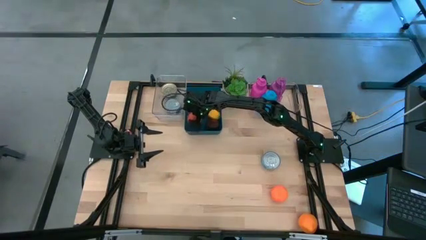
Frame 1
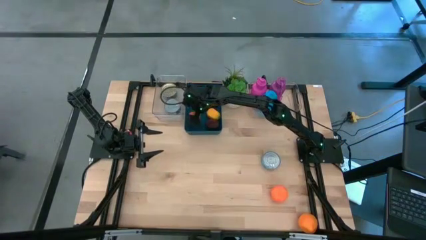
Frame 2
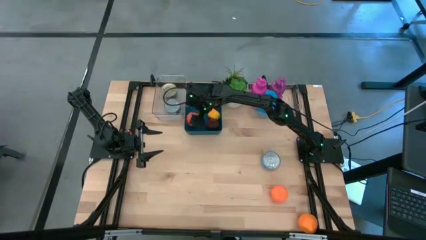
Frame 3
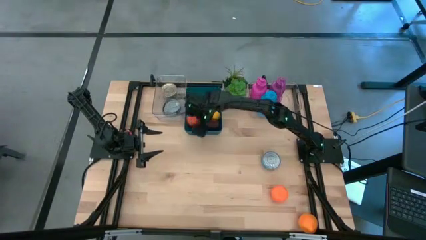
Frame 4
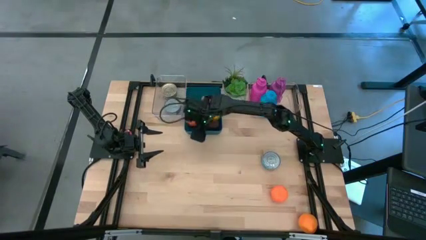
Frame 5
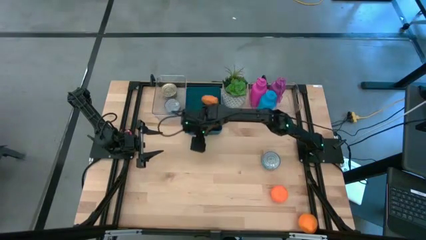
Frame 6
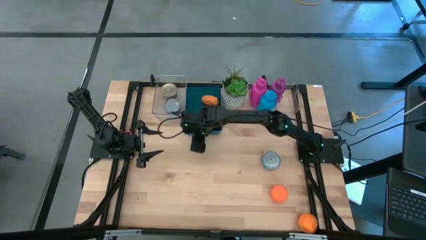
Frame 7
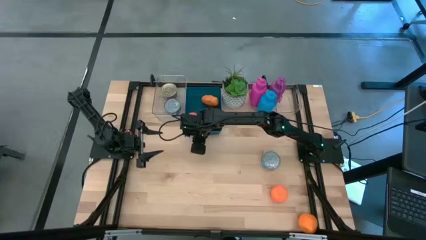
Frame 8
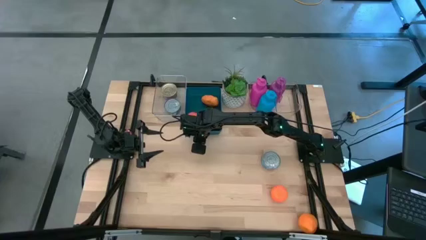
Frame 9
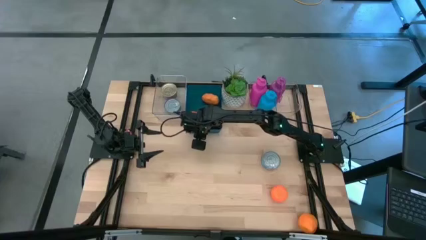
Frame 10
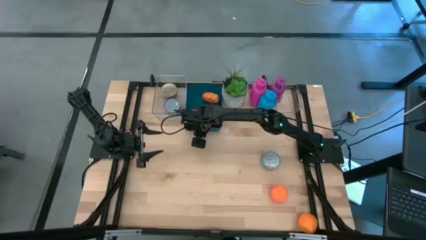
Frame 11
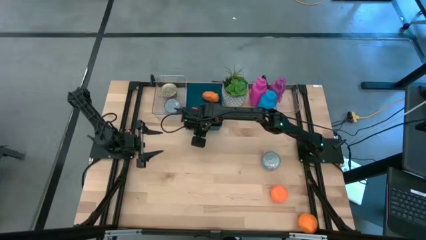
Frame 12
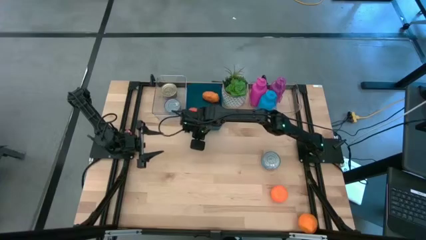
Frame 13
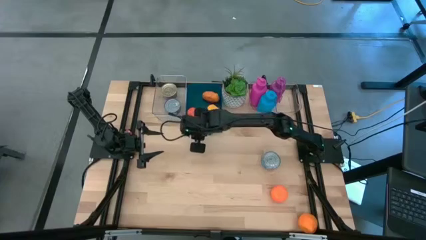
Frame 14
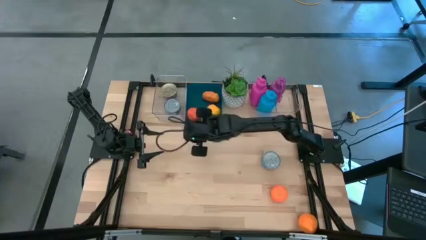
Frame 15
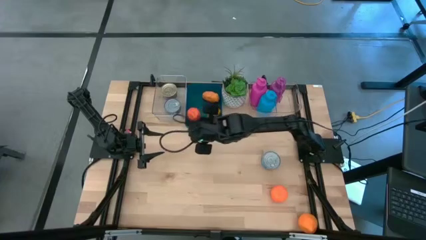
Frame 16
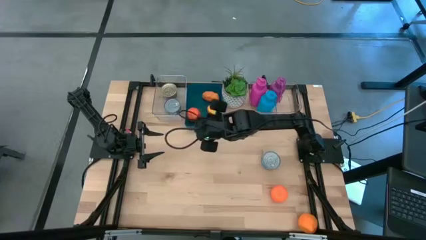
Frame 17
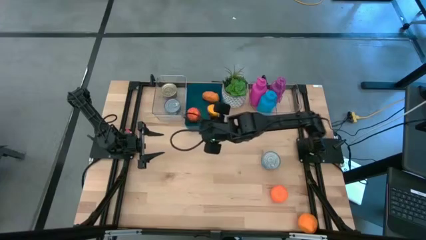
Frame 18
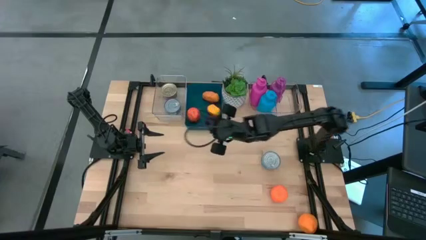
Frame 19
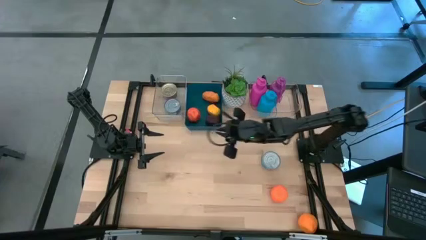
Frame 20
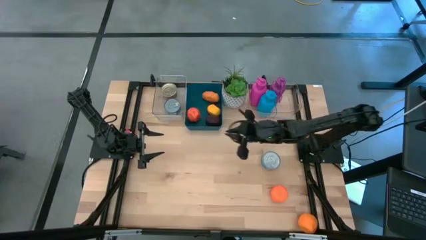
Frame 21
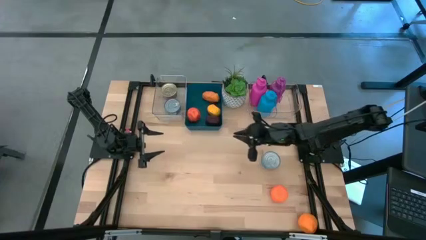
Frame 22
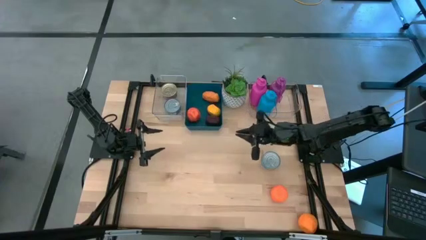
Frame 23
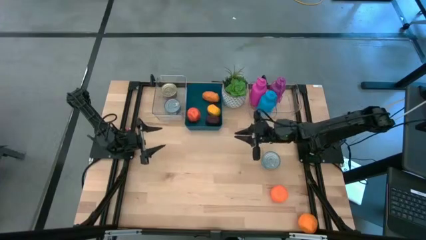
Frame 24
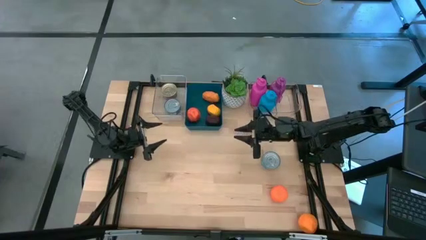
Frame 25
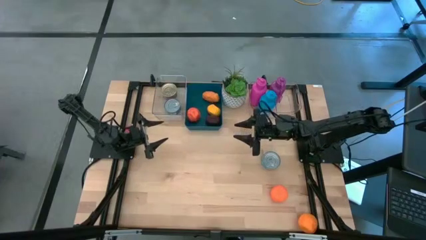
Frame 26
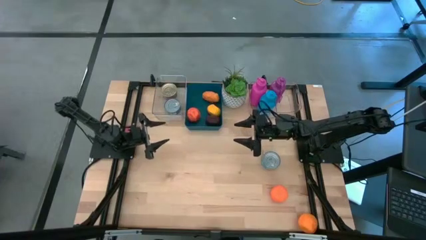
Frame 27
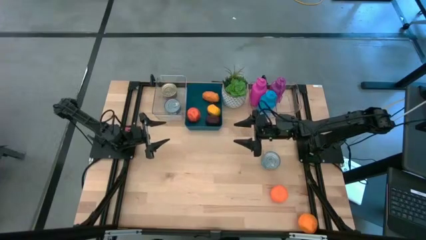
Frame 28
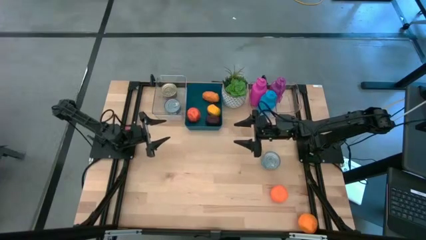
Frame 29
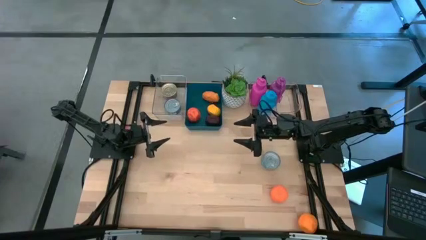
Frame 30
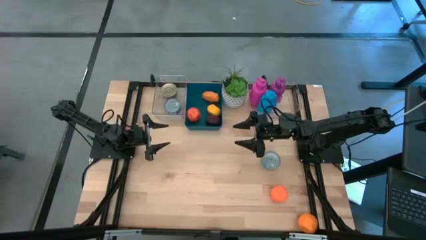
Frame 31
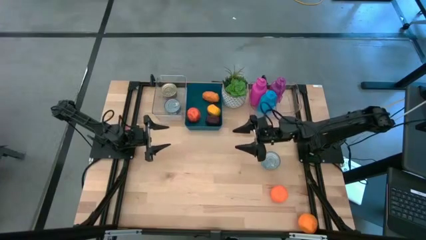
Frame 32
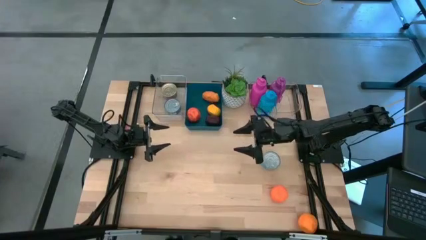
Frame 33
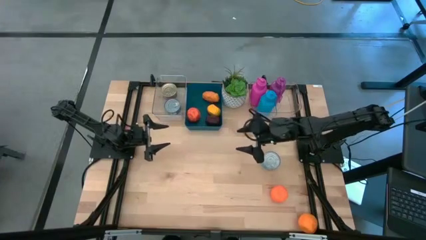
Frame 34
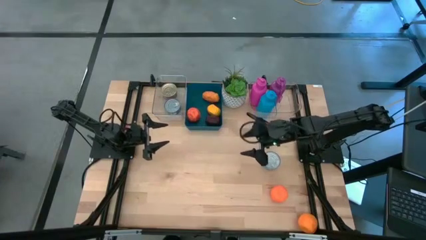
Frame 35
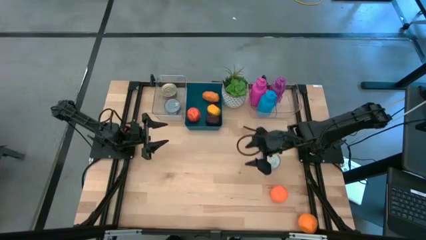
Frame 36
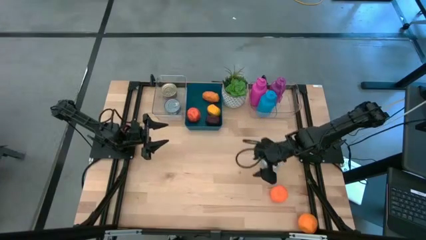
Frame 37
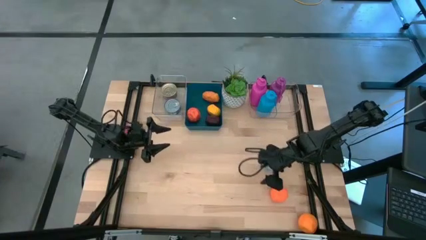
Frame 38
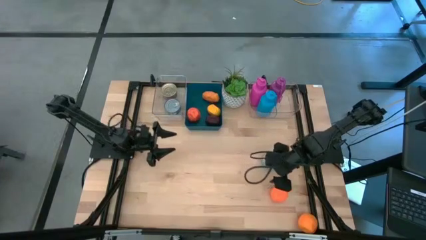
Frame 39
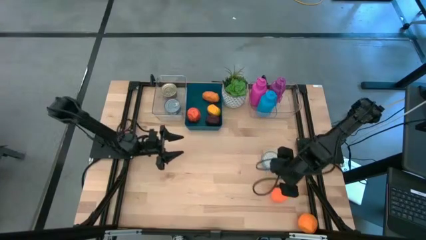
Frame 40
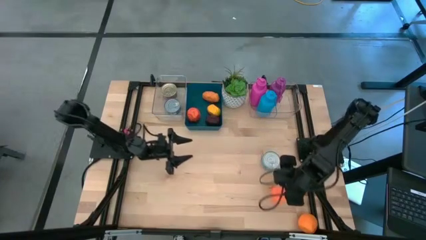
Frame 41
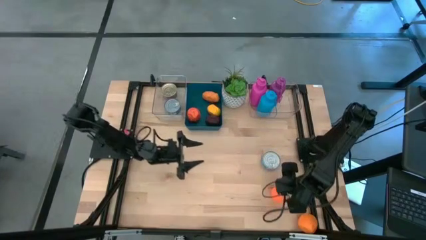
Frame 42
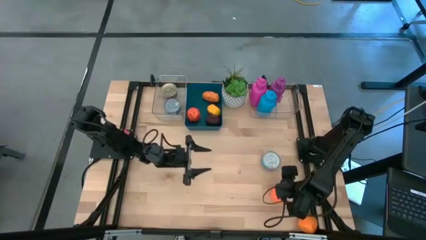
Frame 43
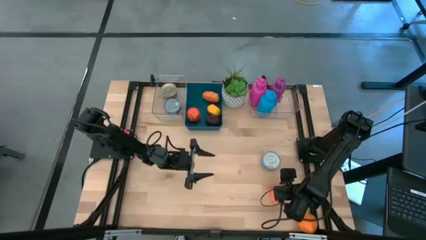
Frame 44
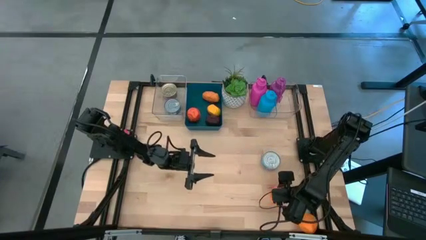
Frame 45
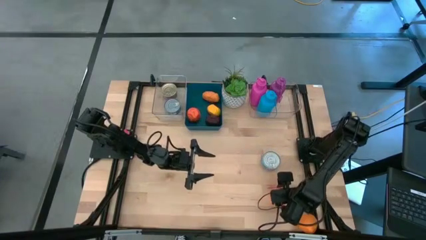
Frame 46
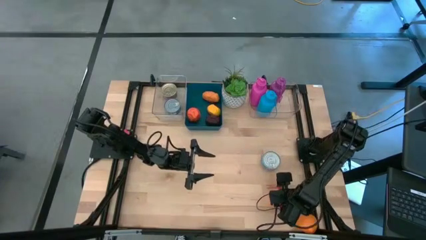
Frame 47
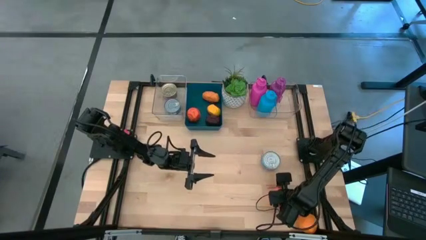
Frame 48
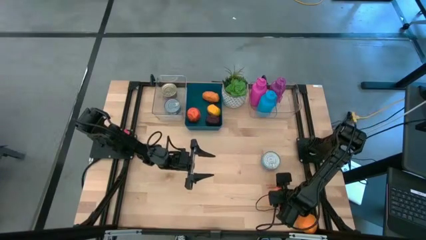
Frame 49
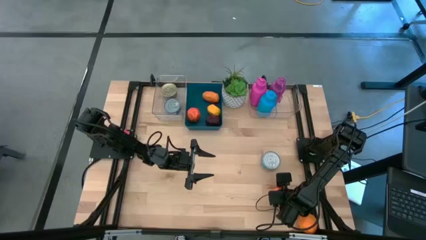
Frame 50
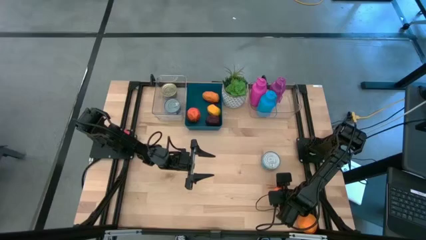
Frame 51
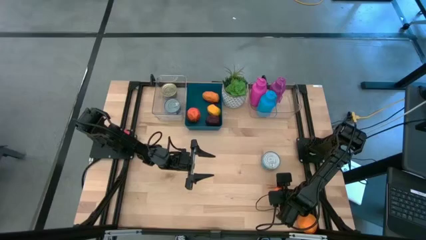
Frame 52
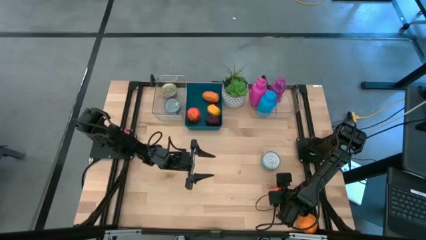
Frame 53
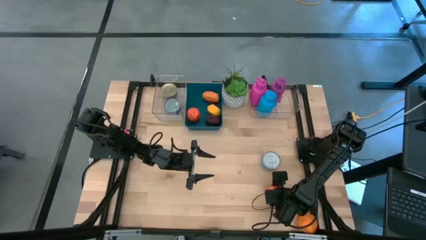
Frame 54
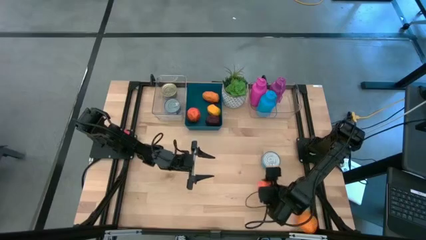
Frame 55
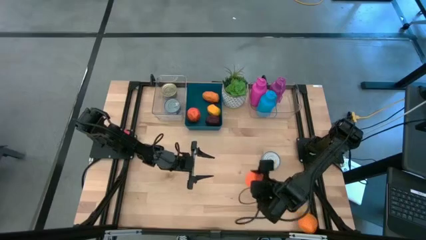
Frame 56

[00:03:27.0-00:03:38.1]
Task: Pick & Place Food Item
Put the top orange into the blue bin

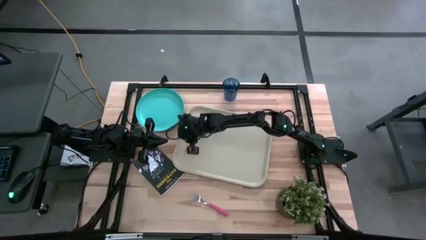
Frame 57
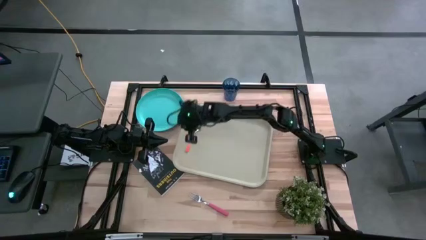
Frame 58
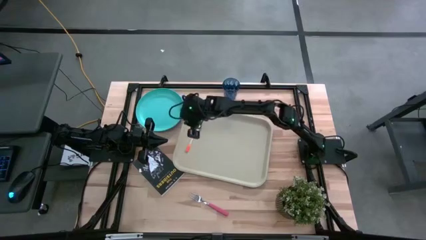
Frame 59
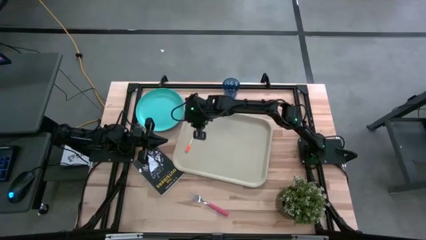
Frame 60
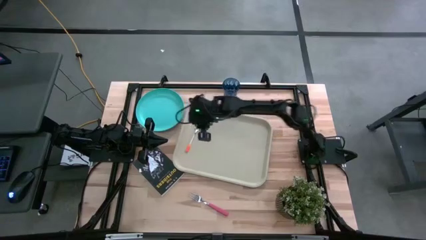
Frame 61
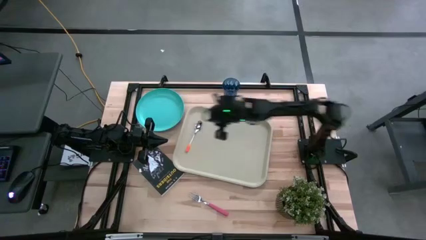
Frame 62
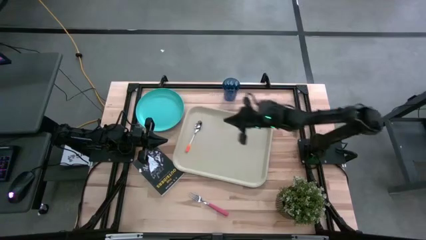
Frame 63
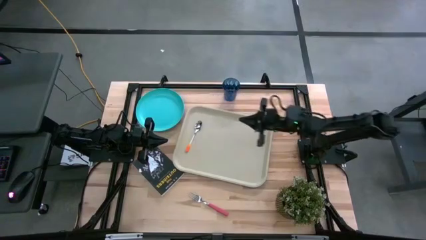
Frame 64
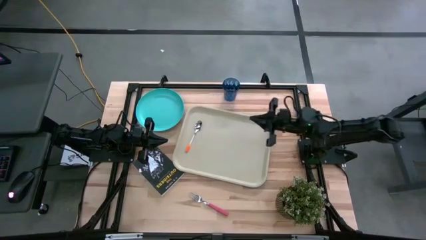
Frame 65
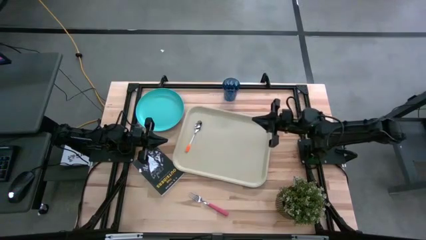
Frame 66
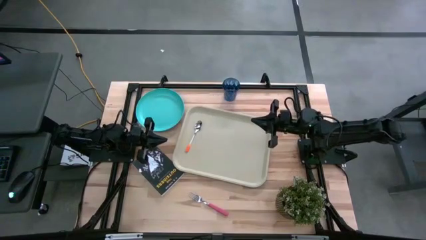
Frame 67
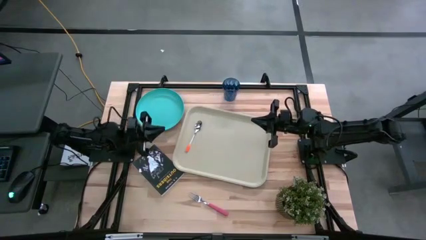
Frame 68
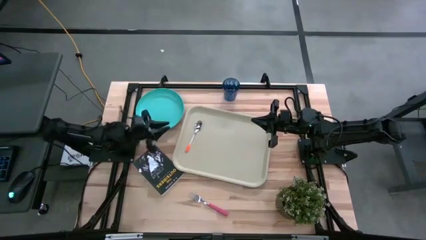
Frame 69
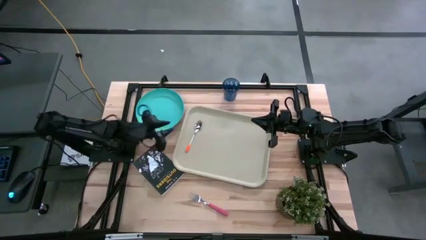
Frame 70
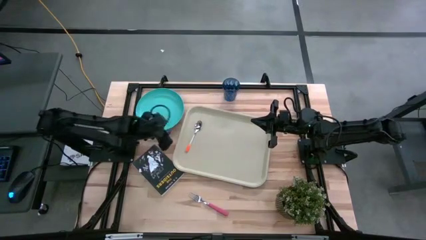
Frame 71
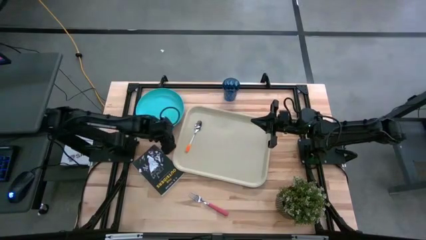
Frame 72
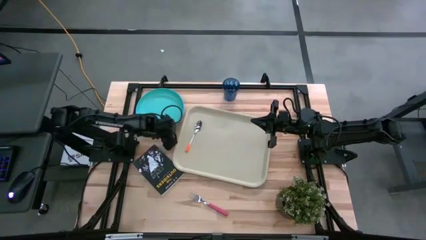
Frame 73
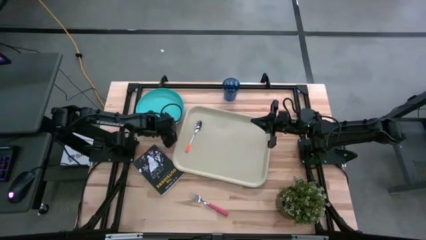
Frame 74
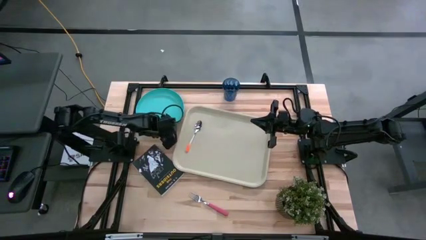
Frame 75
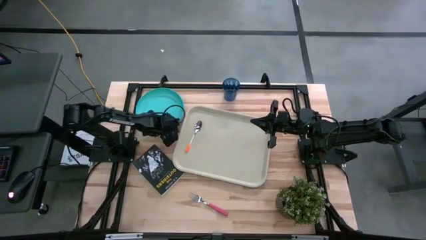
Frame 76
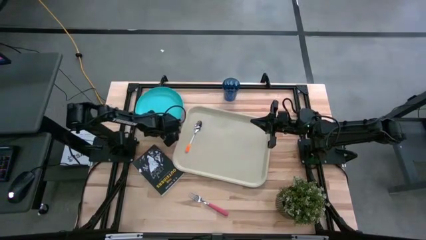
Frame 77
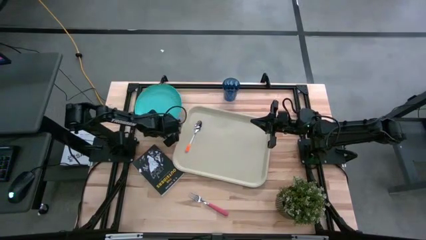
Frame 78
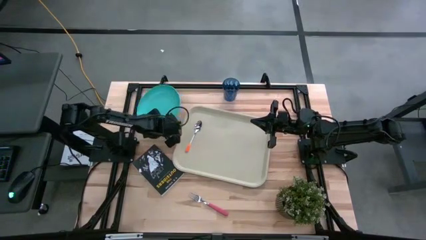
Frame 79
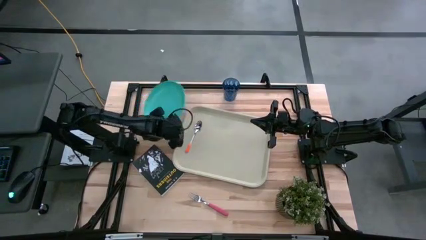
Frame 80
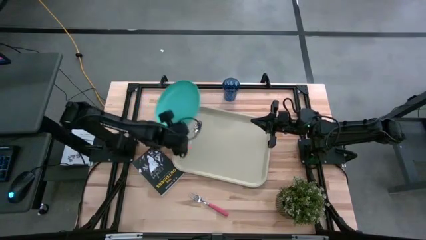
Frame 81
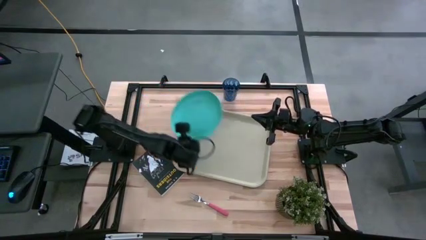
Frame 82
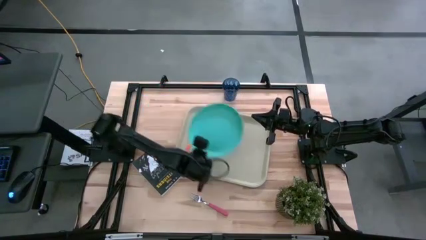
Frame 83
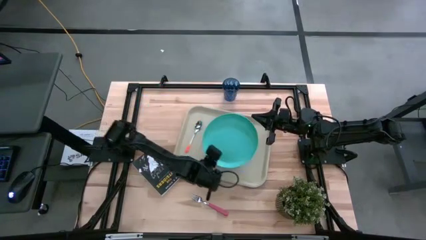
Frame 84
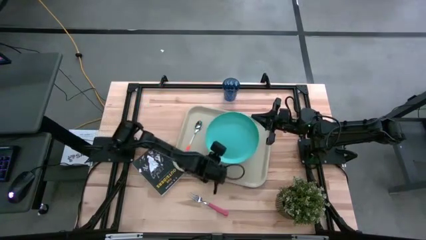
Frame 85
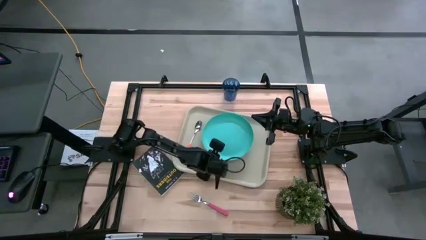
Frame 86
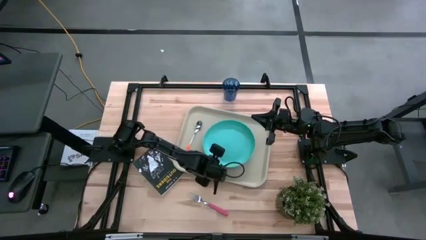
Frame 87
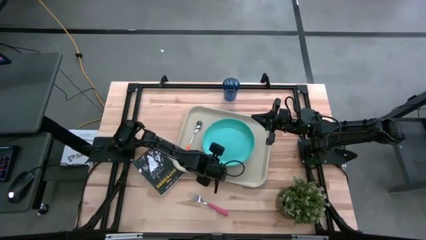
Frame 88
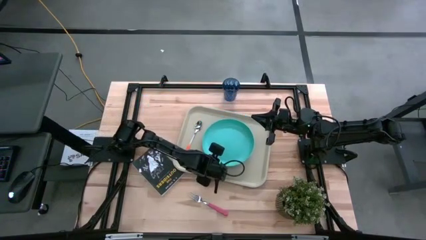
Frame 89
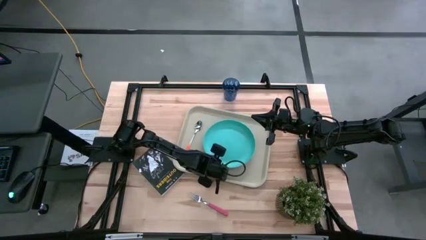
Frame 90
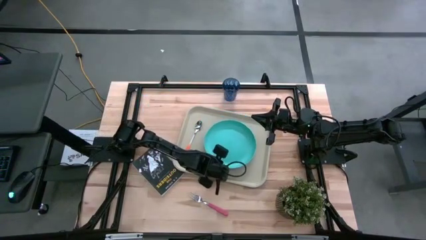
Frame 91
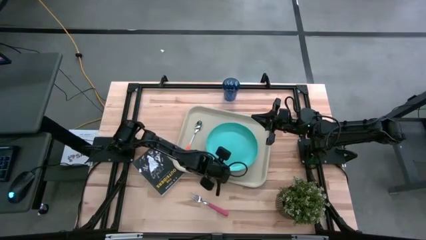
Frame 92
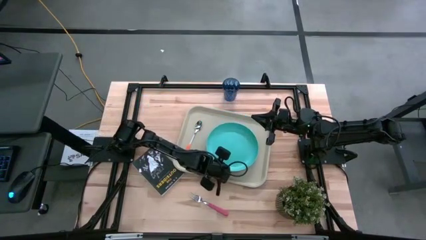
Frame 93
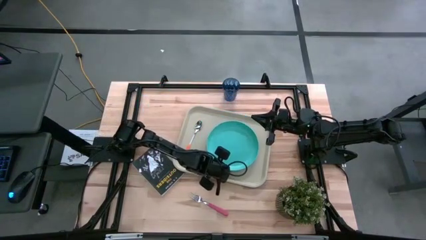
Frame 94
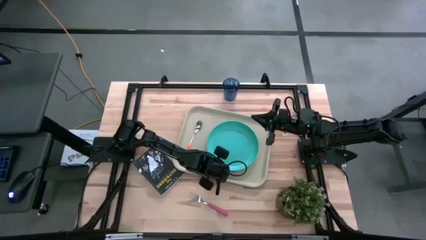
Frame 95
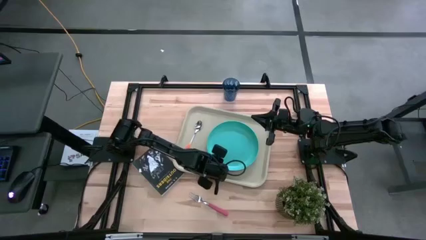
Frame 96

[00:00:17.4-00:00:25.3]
Task: Pick and place plate/cup/fork/spoon on tray
Put the green plate on the left side of the white orange spoon
